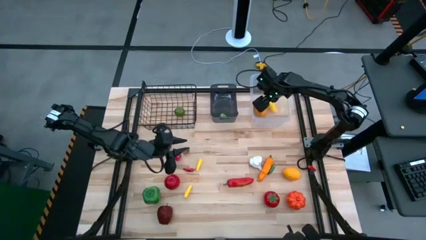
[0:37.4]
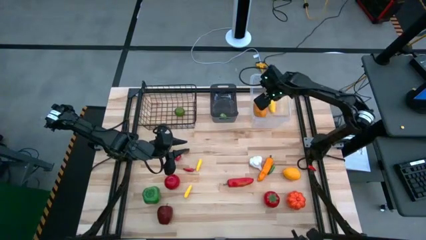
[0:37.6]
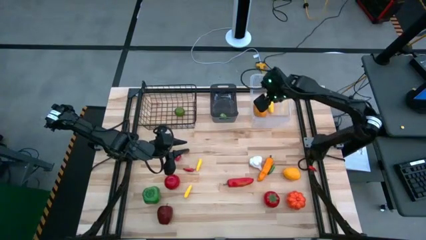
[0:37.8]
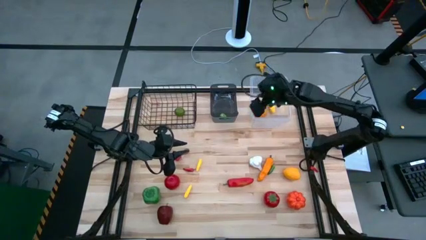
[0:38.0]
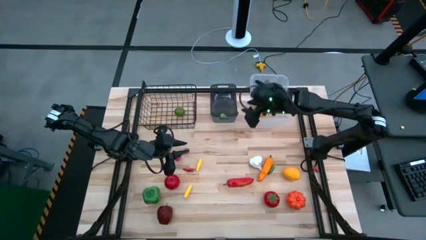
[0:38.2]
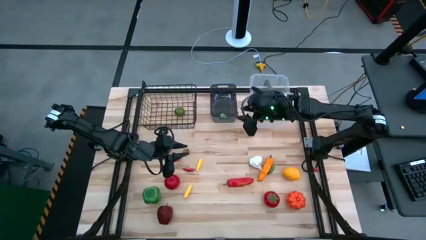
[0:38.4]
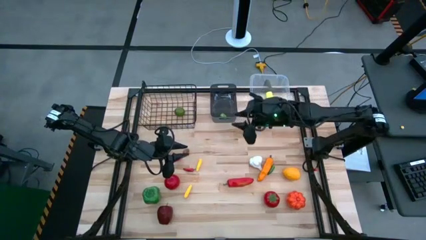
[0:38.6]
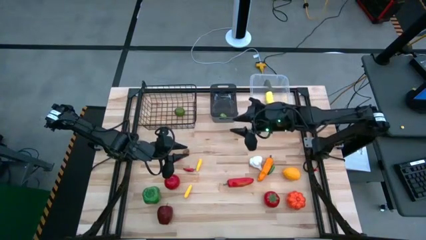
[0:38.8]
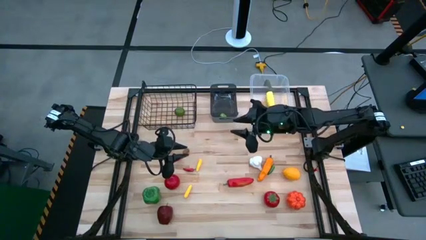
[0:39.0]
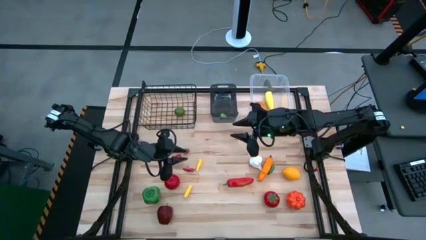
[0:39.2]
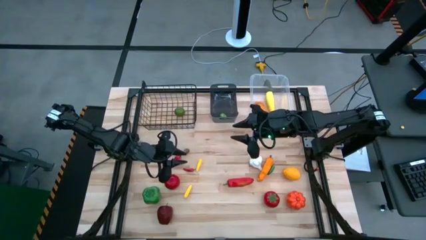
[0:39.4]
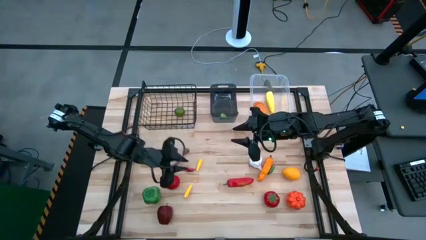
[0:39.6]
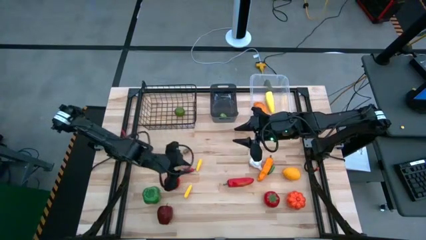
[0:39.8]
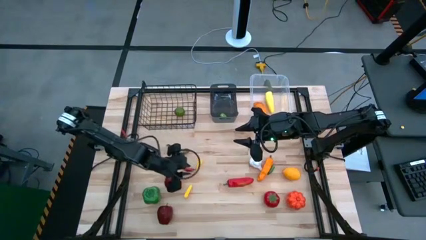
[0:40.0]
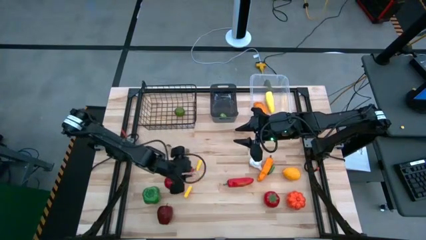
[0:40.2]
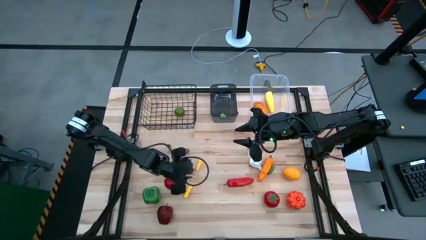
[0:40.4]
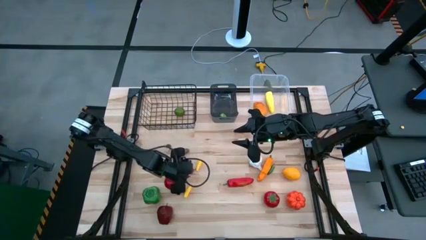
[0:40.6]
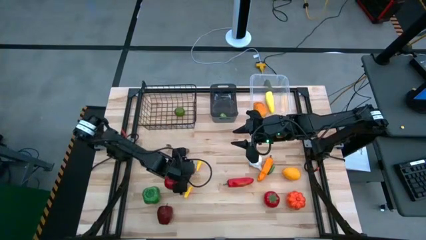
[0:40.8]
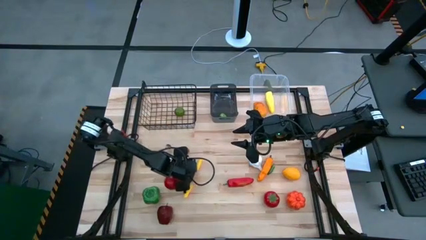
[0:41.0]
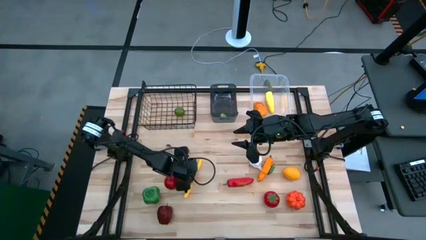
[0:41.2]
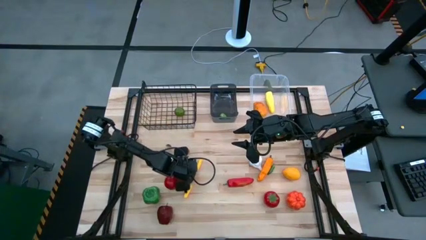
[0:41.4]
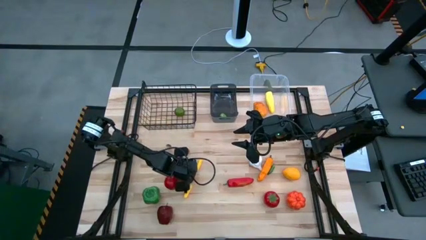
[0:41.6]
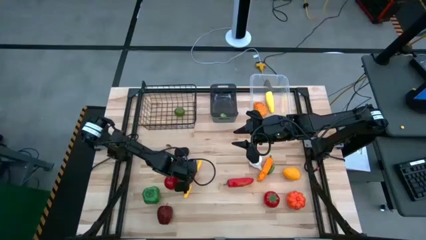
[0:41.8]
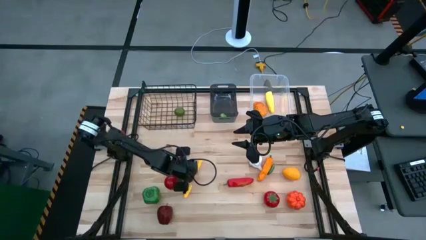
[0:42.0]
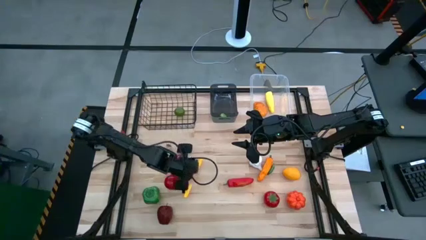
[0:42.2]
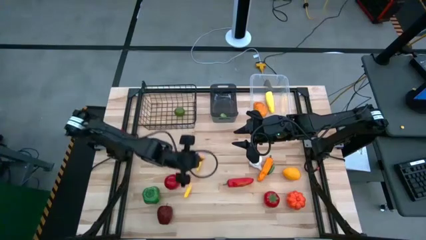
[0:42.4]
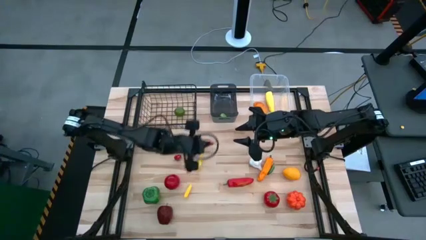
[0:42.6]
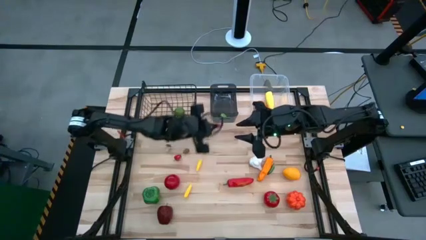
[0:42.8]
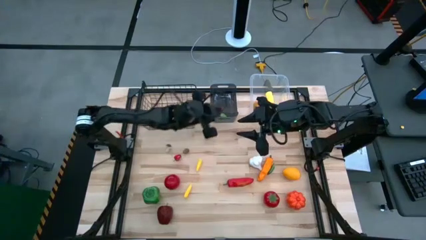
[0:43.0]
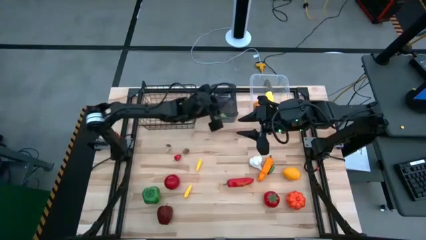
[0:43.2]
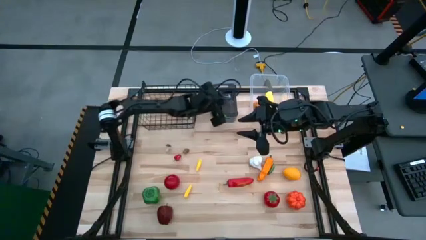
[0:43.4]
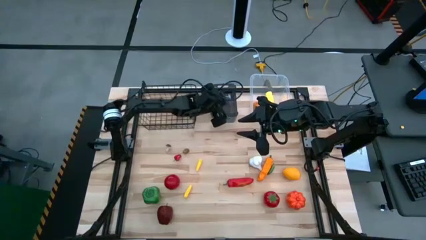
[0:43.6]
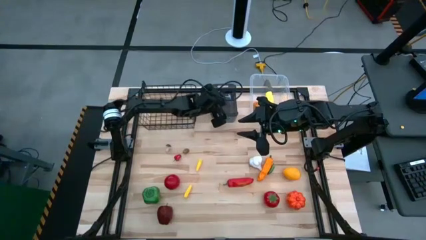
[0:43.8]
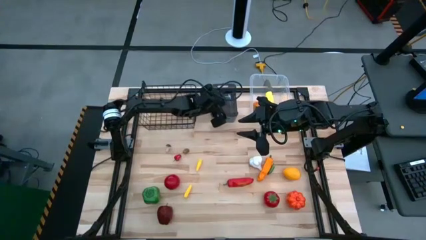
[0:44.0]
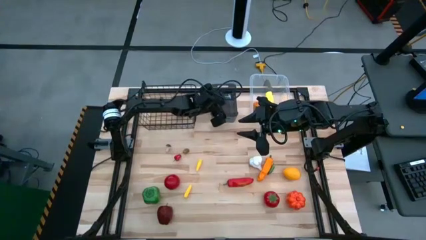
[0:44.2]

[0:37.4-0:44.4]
Task: Sort produce into baskets
Put the small red chili pepper into the black bin

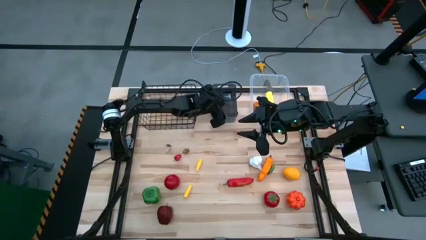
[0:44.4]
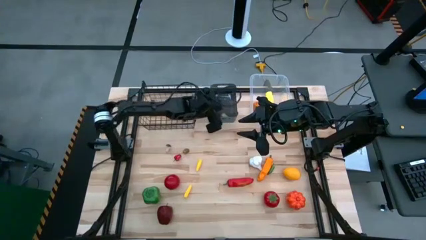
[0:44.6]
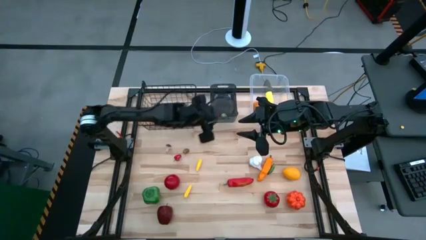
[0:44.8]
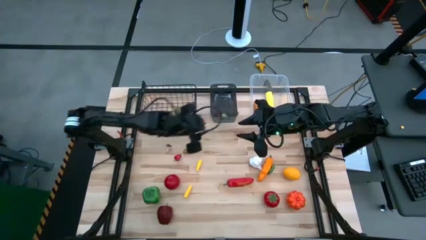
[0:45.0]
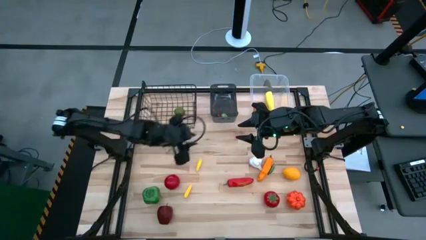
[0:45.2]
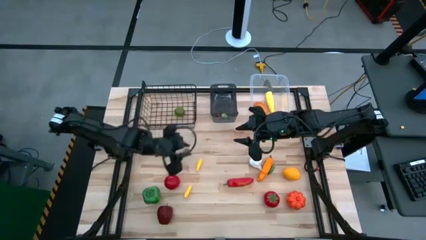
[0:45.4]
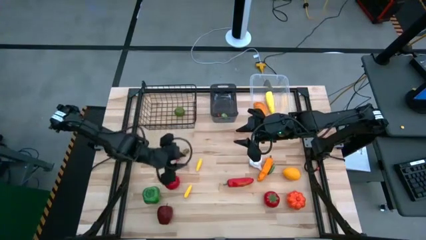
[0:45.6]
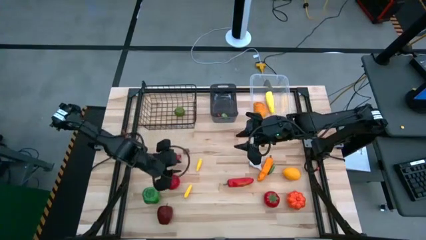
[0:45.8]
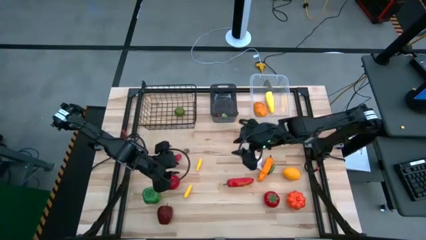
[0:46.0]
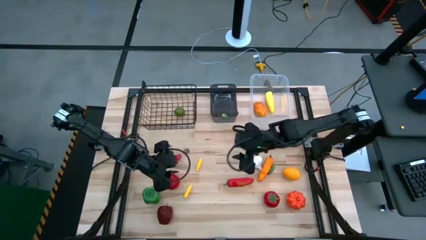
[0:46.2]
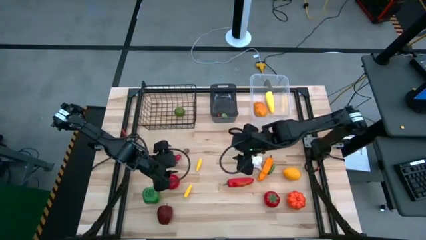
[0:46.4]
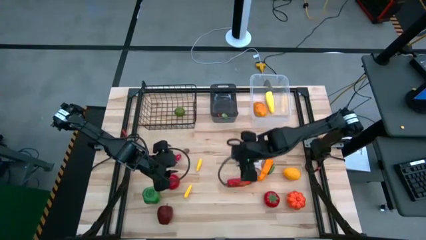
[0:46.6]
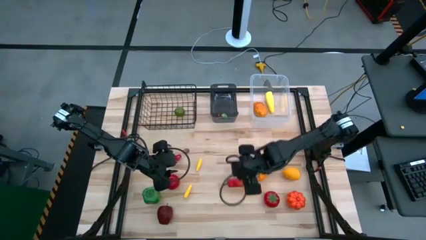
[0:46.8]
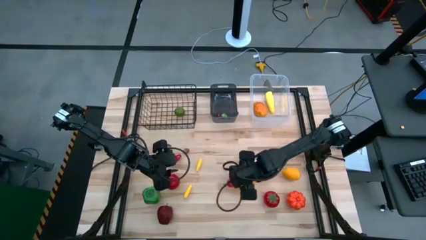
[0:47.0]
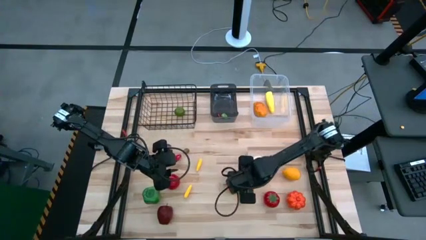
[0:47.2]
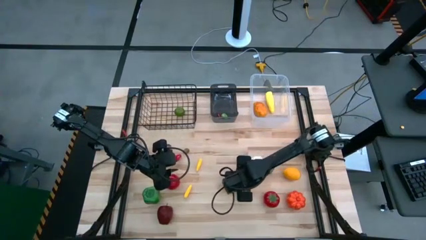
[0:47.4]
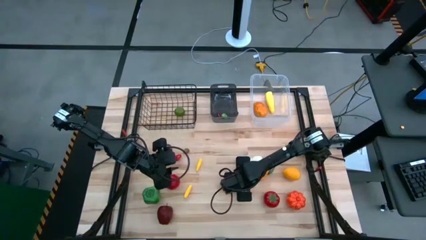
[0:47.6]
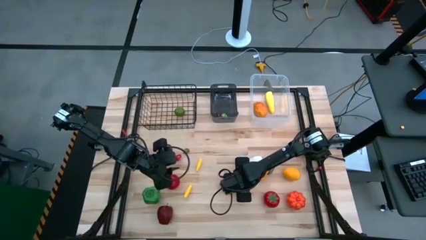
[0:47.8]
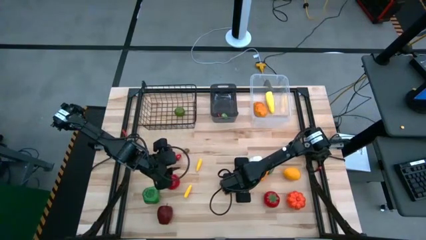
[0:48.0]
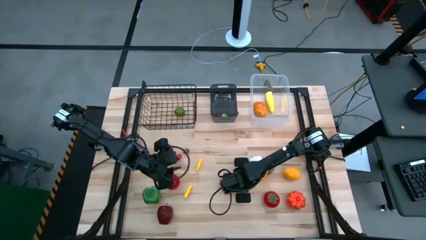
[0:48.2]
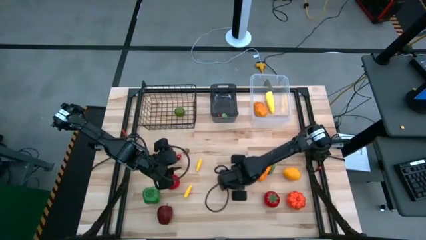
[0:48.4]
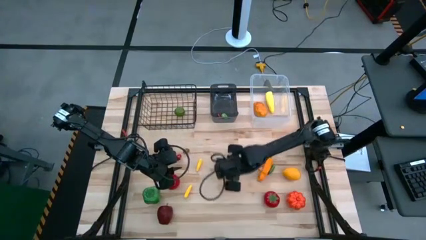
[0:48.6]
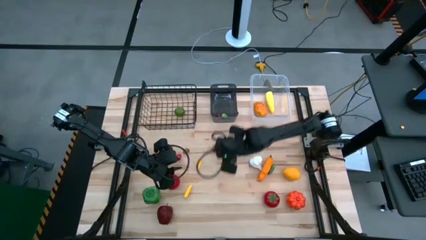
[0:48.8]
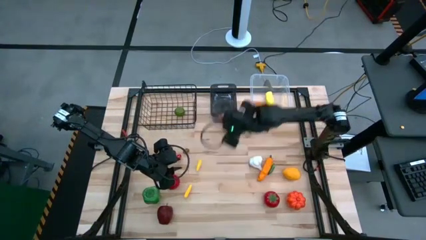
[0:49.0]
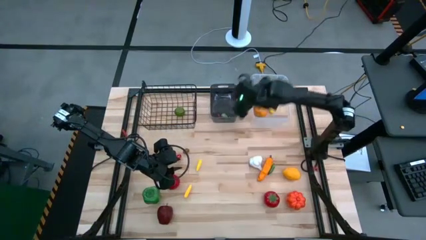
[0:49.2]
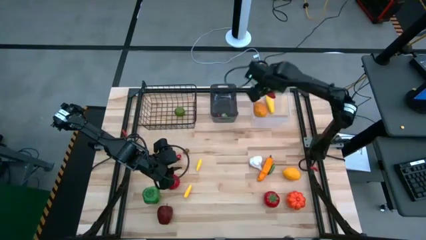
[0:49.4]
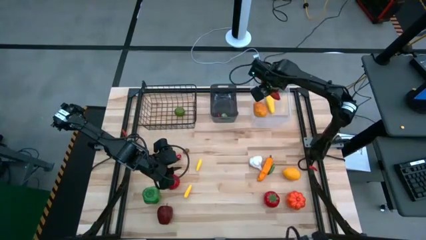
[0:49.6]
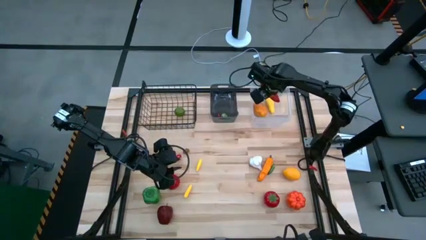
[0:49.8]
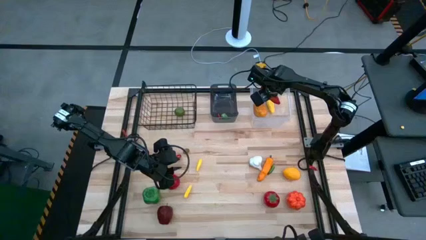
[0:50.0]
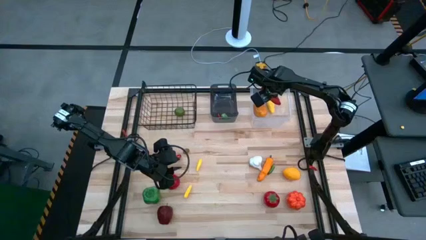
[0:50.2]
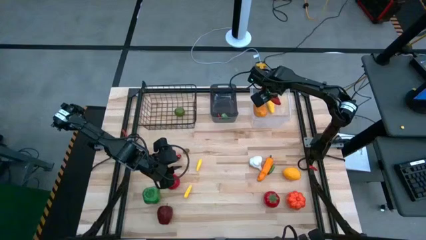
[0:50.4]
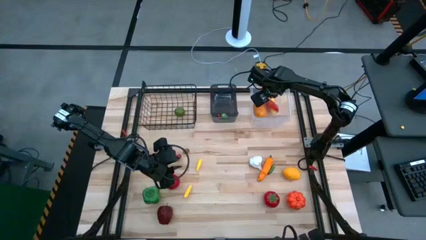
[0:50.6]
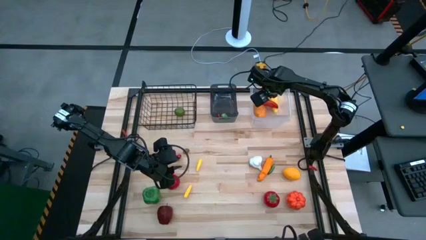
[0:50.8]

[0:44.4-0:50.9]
Put the large red chili pepper into the white bin

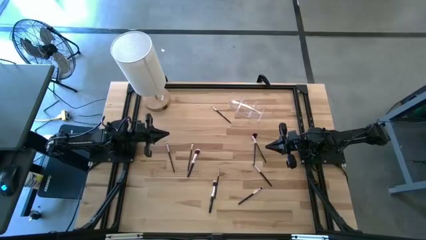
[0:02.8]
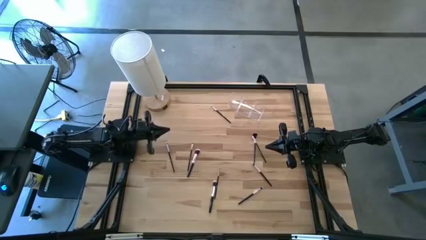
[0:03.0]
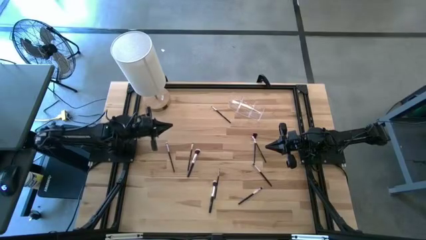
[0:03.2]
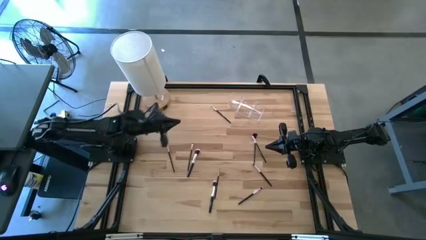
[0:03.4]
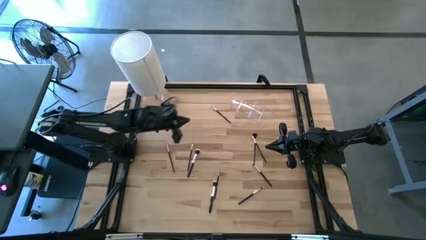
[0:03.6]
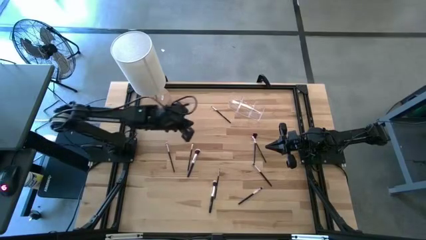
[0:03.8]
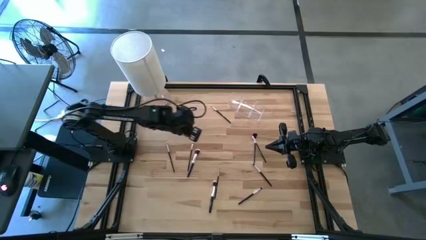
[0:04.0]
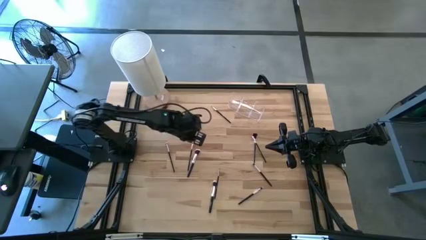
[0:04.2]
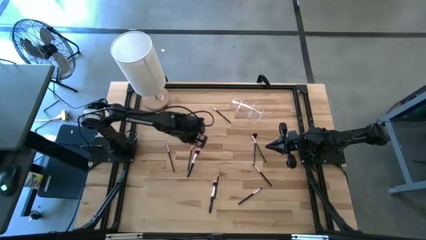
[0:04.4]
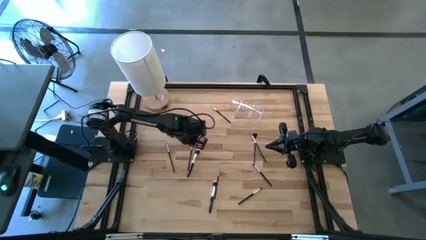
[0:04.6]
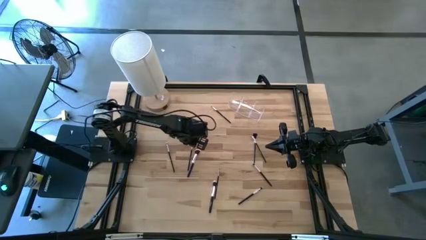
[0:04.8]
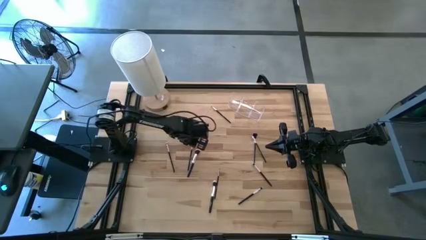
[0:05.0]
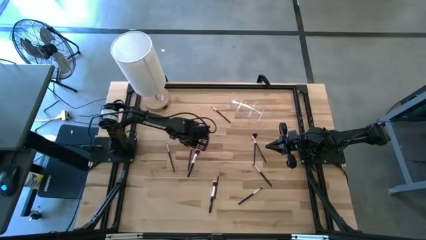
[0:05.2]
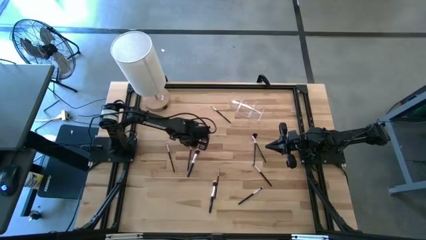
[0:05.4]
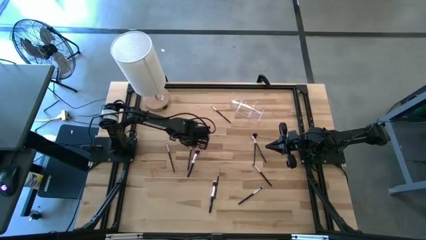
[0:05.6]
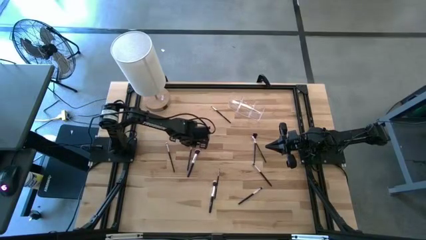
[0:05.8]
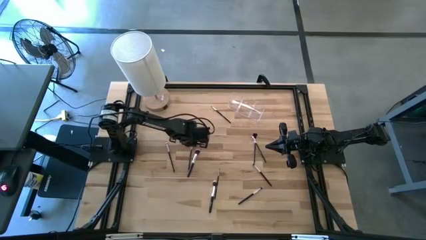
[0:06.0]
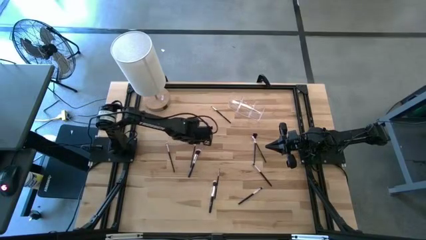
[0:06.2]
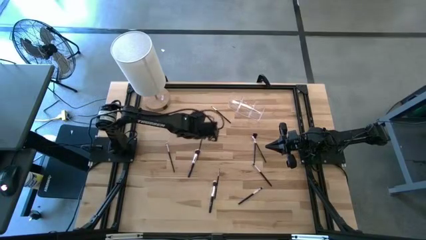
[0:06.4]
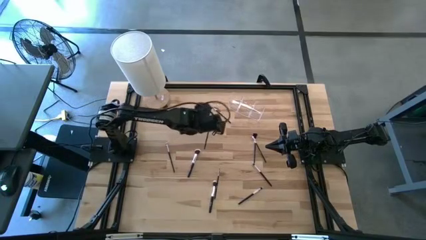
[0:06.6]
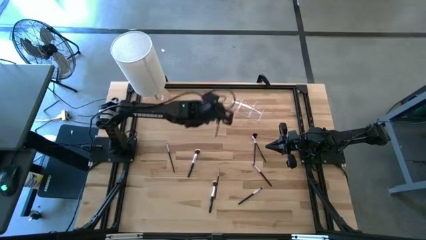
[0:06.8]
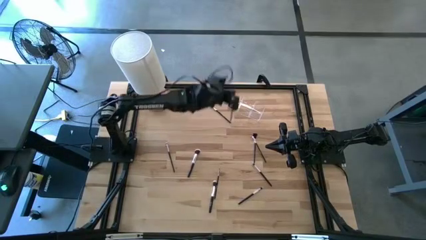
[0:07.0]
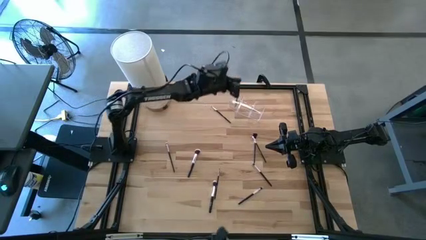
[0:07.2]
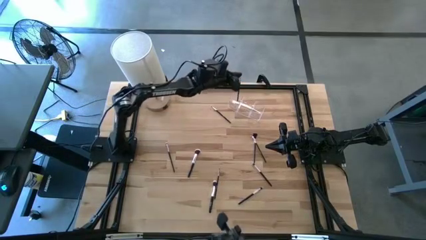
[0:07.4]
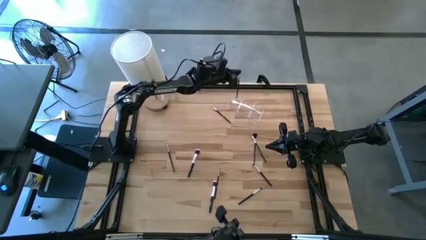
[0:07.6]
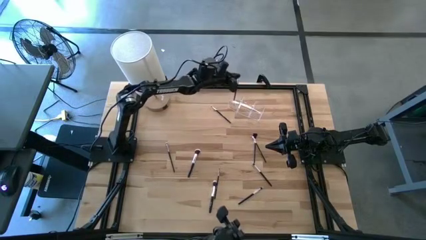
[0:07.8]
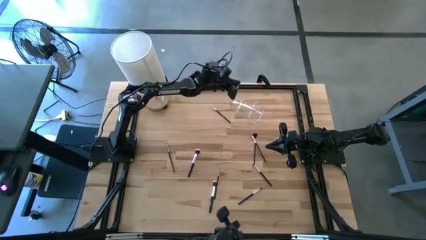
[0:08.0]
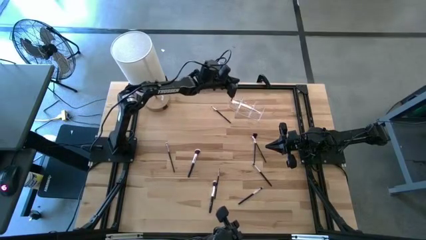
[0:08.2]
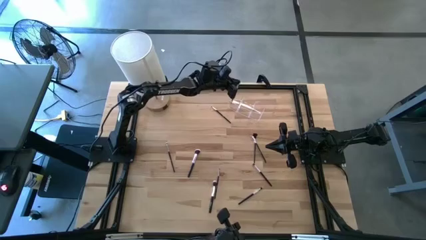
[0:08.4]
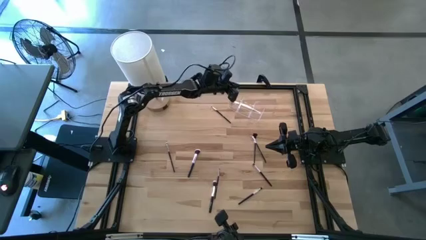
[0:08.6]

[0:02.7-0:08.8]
Task: Pick & Place Makeup Brushes
Put the black makeup brush into the transparent organizer
